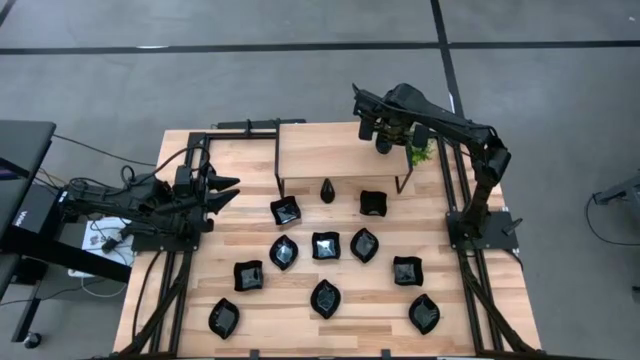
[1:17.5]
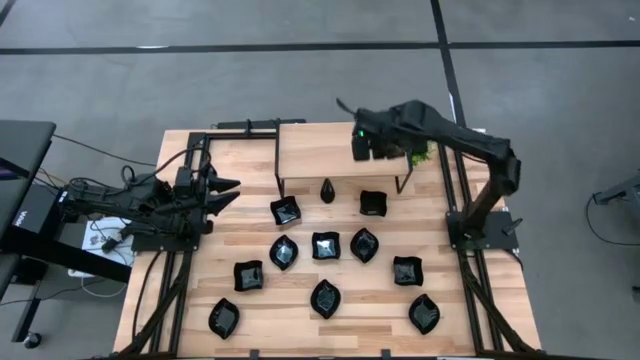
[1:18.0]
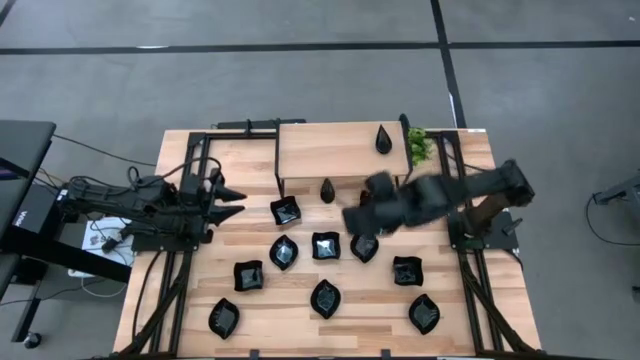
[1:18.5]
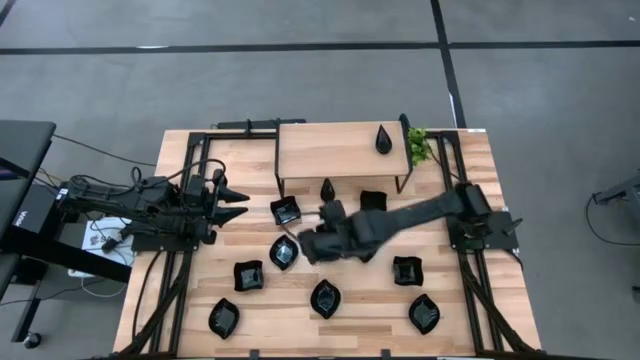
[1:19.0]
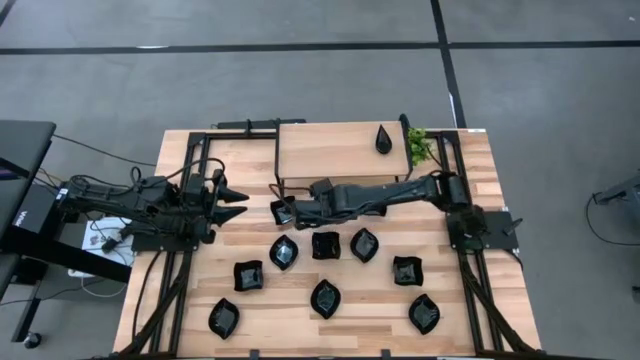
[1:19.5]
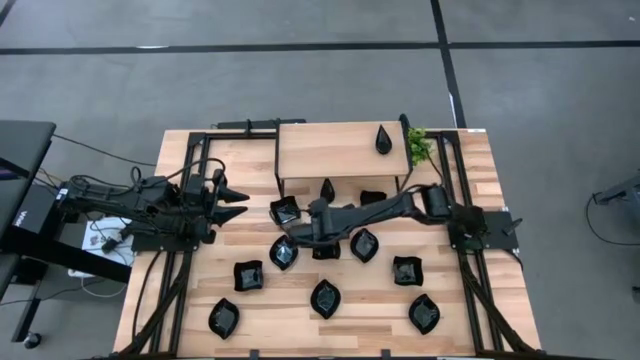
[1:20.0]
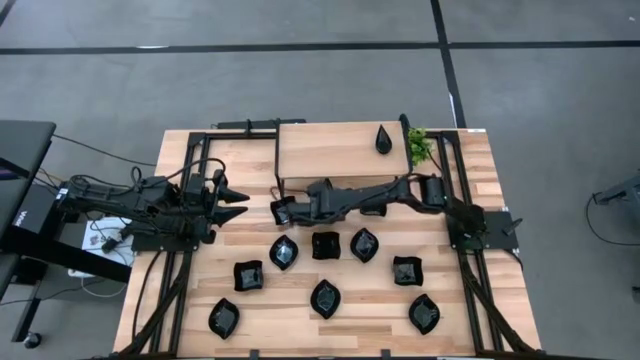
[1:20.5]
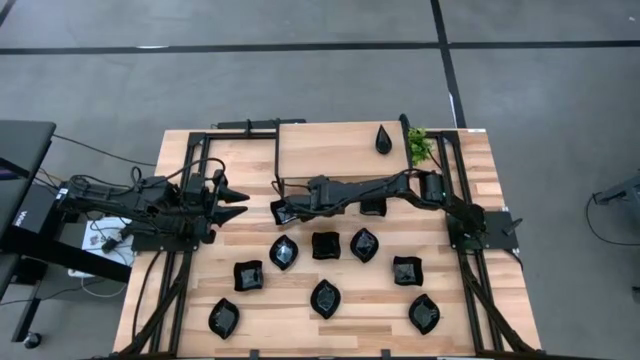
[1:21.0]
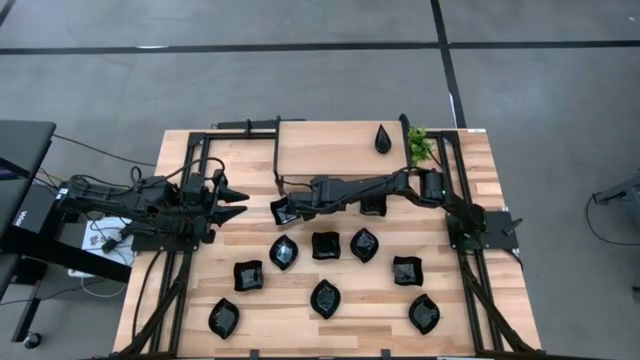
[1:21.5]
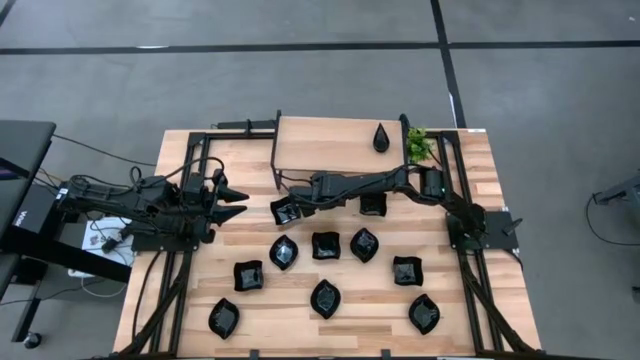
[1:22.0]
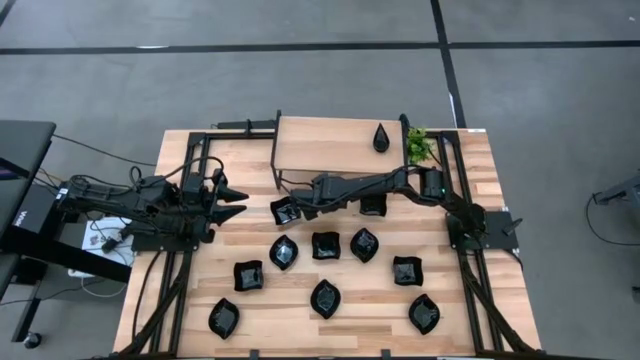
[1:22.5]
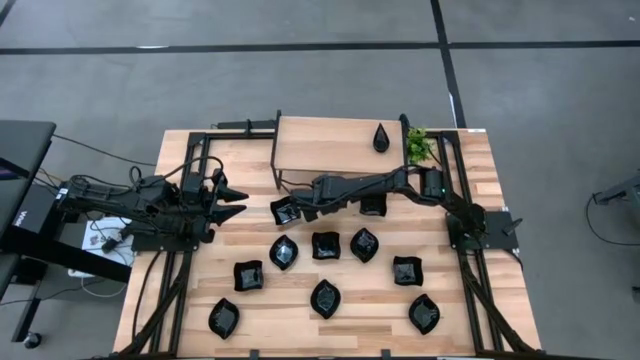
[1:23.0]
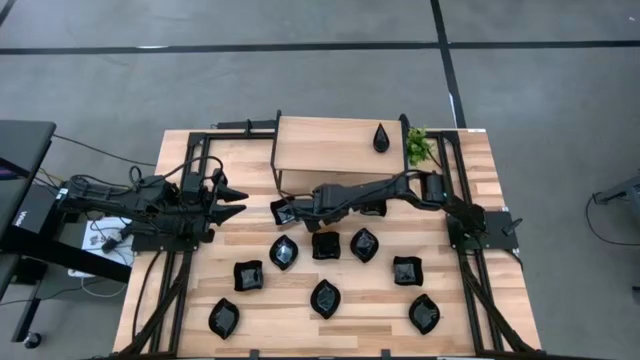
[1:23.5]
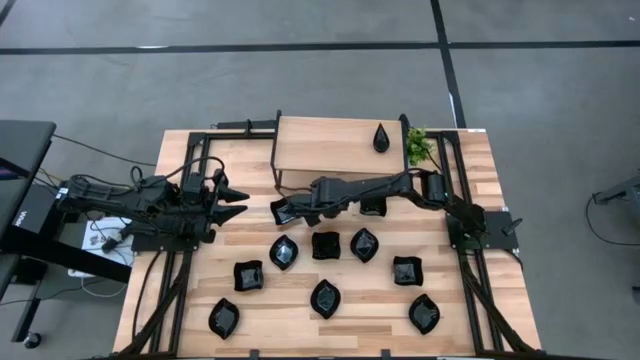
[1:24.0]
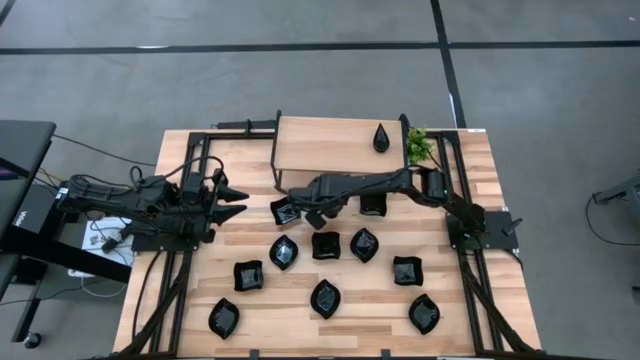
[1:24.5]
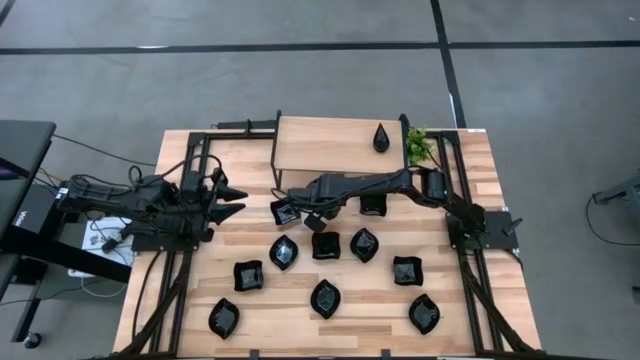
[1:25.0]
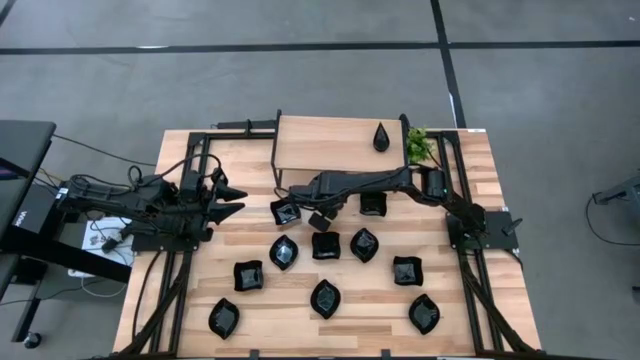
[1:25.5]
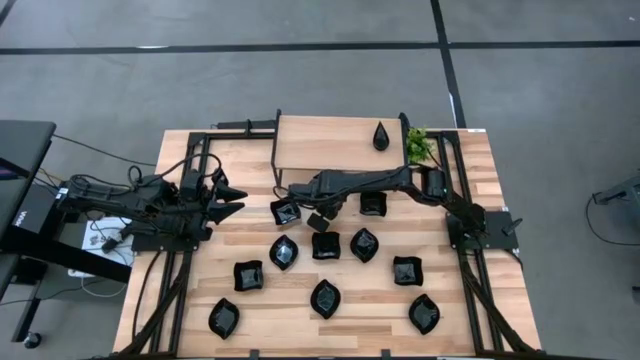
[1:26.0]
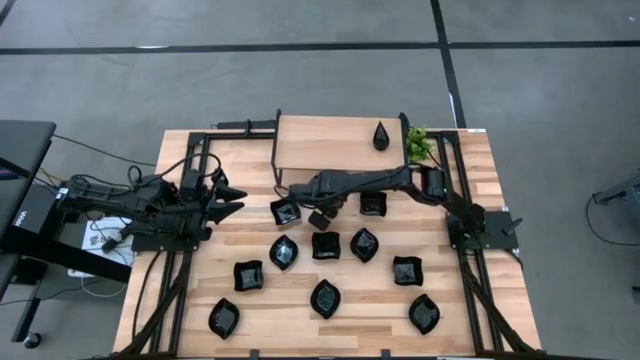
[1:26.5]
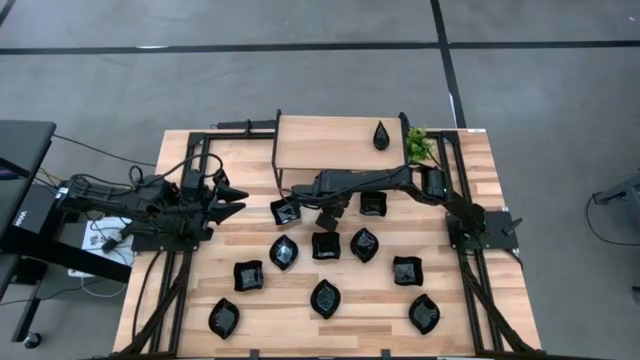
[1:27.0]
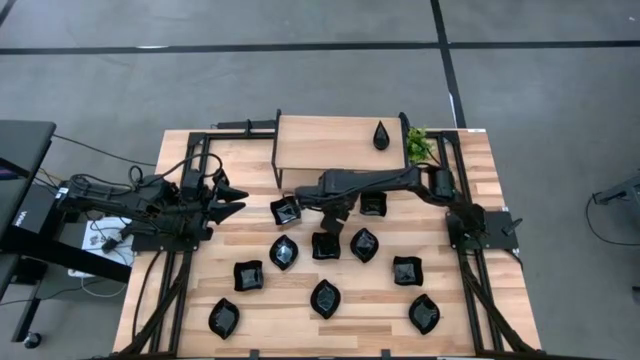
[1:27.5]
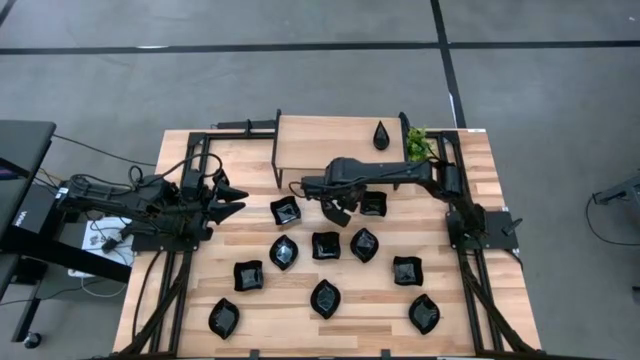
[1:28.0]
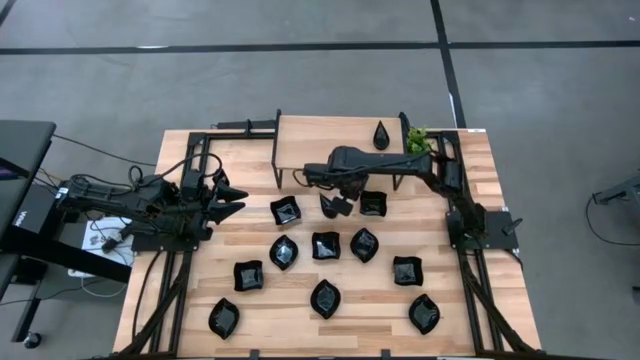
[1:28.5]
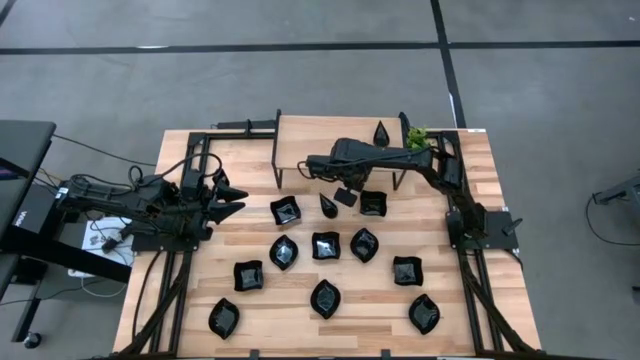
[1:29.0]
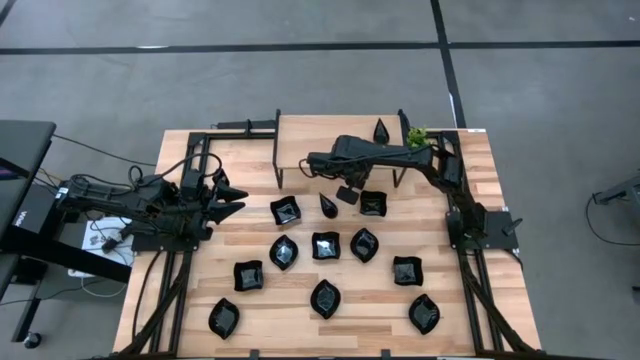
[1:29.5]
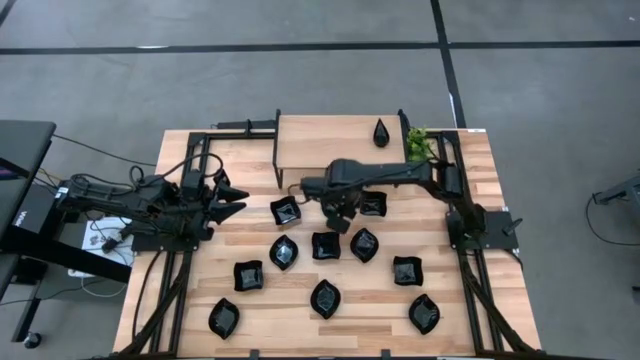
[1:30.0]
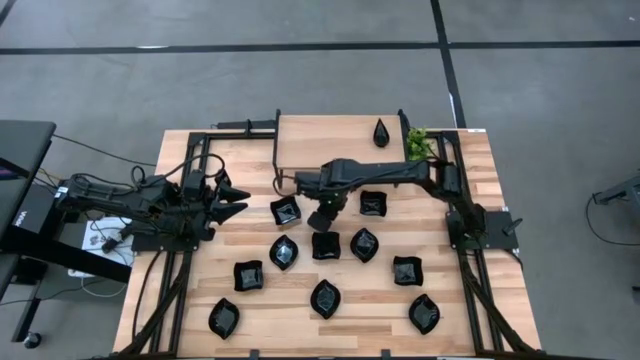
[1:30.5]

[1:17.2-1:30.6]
Task: Pick & Place Mini shaped plates
Stack the drop-shaped plate on top of the drop-shaped plates on the shelf

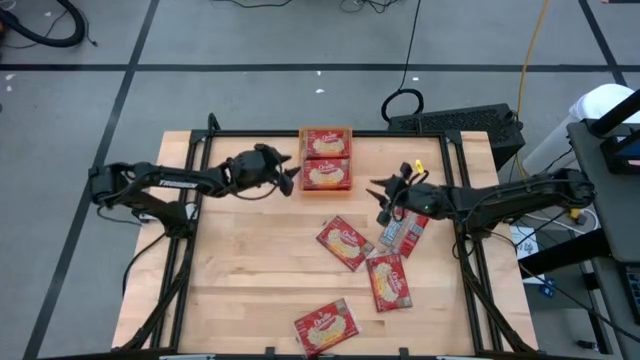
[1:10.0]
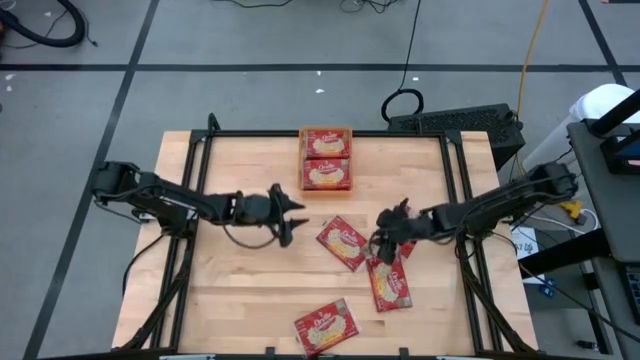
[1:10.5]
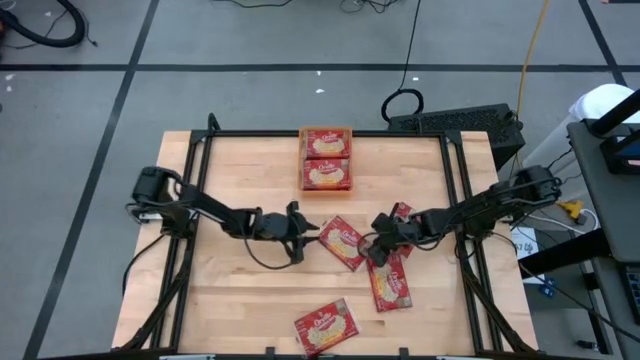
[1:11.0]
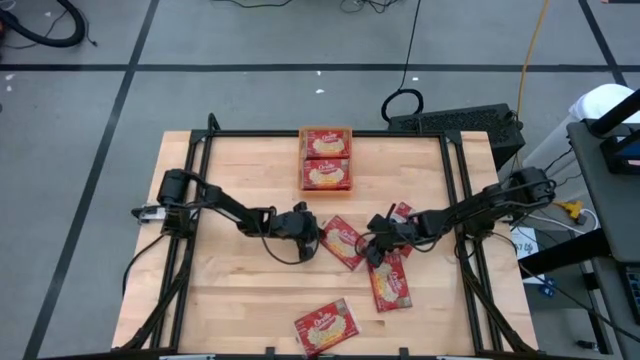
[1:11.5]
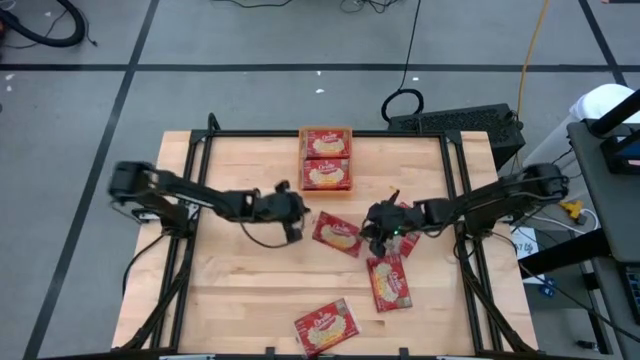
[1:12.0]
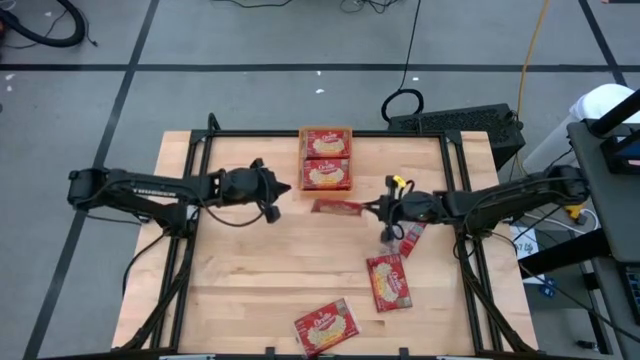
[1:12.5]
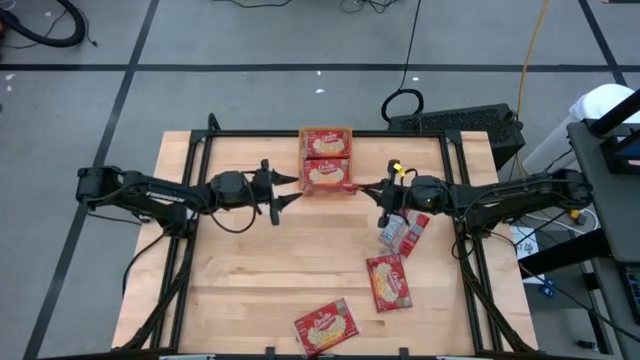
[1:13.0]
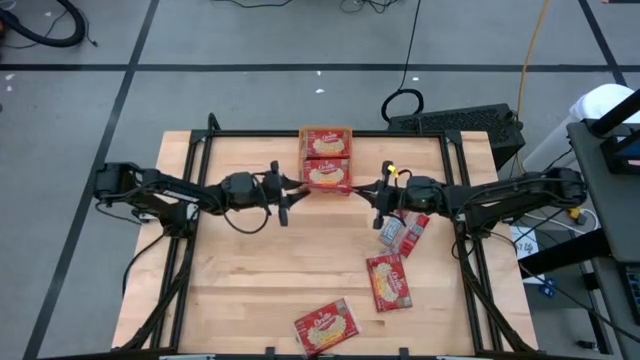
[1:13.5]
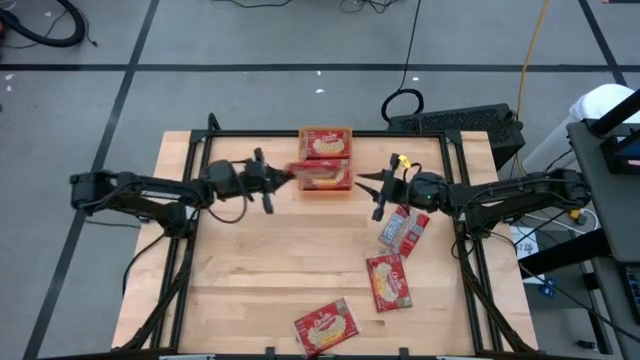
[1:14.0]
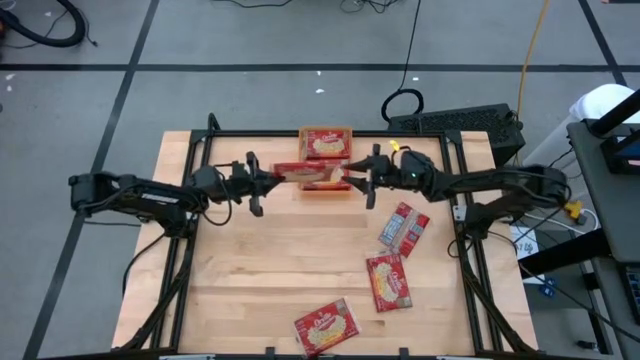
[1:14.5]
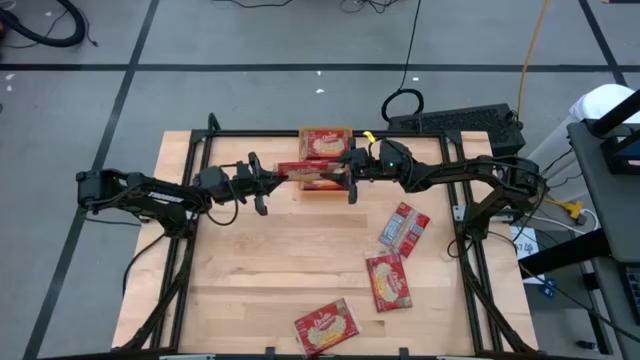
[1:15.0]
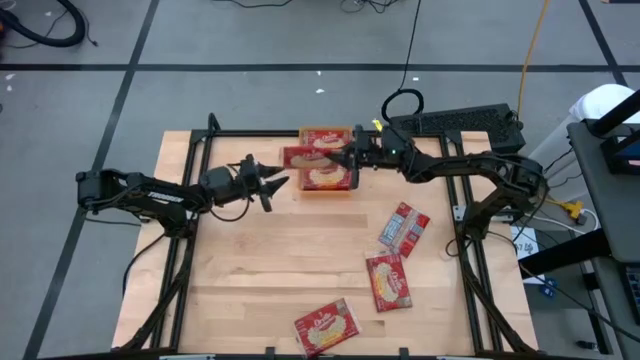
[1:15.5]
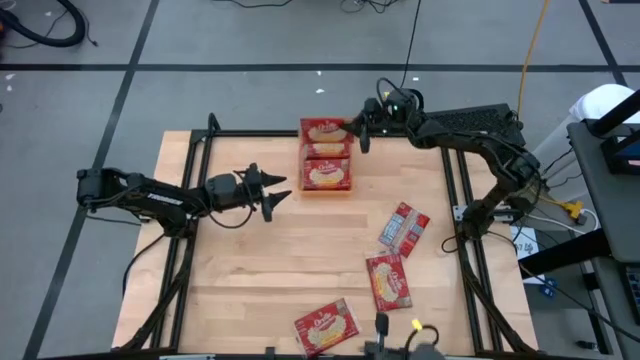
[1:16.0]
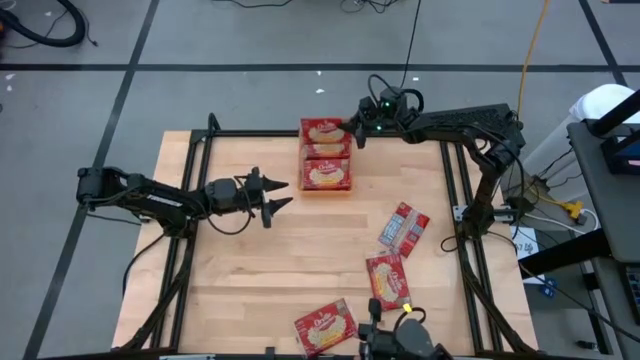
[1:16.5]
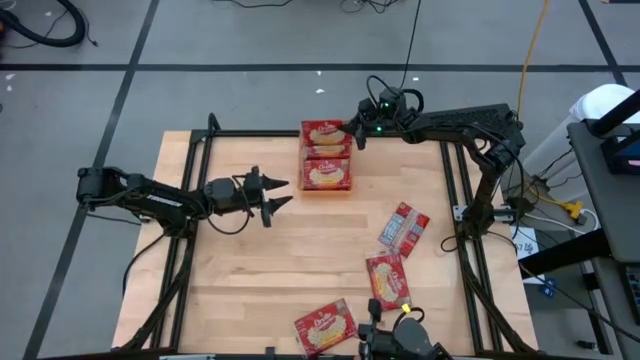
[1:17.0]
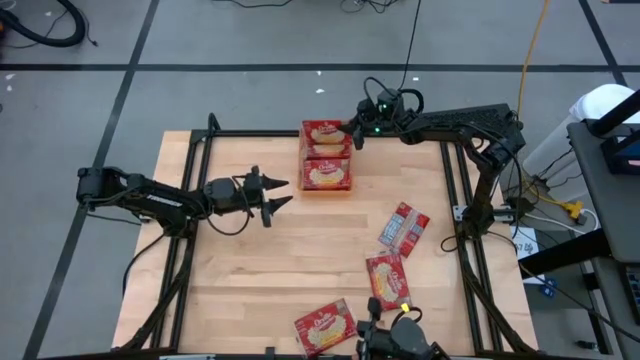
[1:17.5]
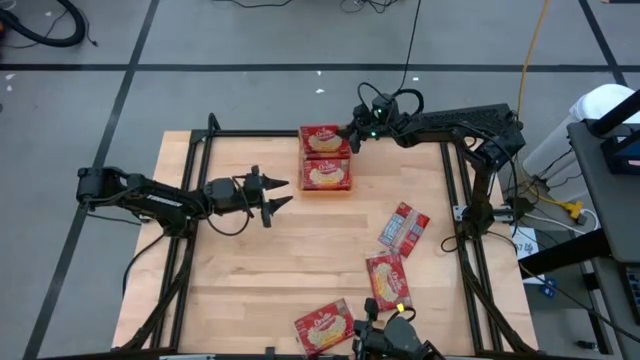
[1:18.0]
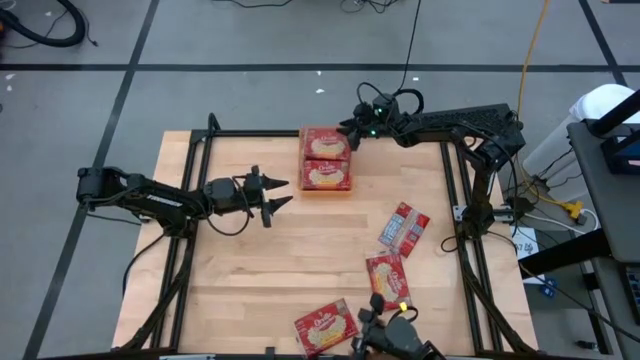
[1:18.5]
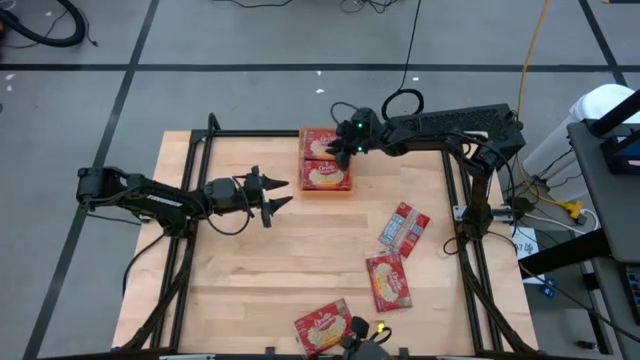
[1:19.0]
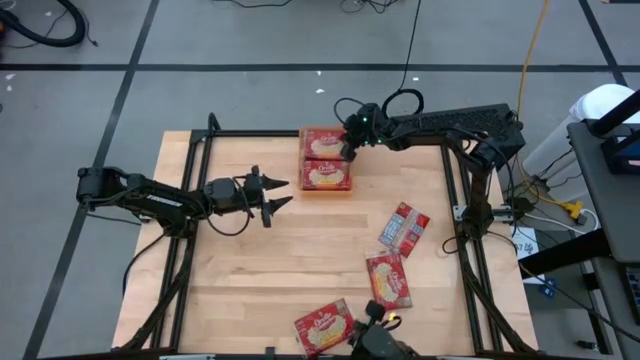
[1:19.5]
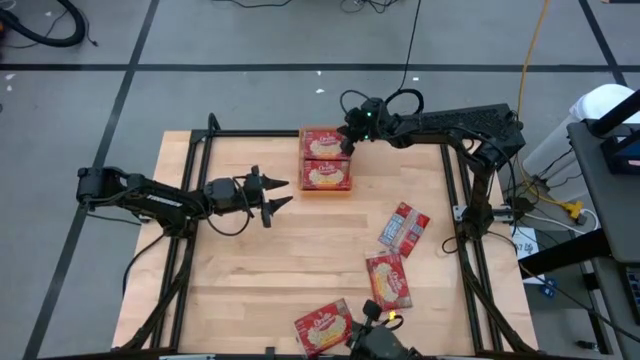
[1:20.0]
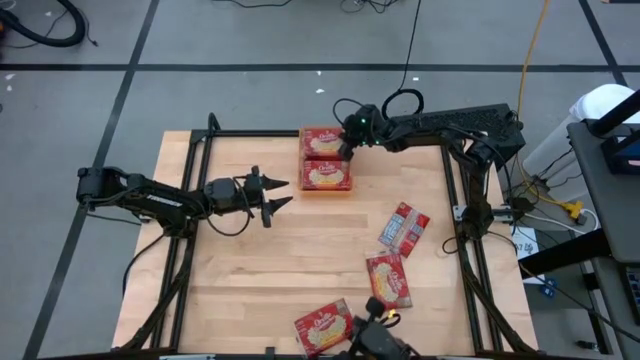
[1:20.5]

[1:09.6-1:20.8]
Task: Sort popcorn bags into baskets
Put the red popcorn bag into the orange bin
